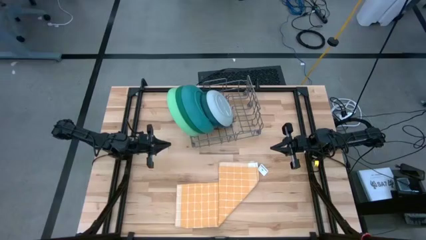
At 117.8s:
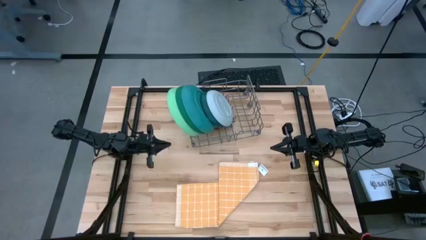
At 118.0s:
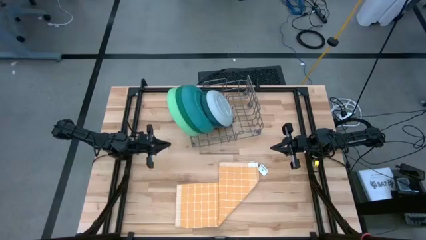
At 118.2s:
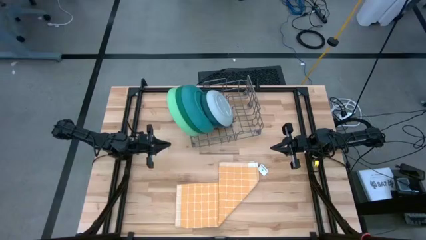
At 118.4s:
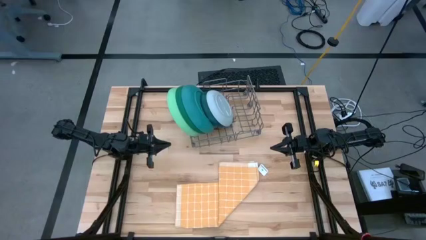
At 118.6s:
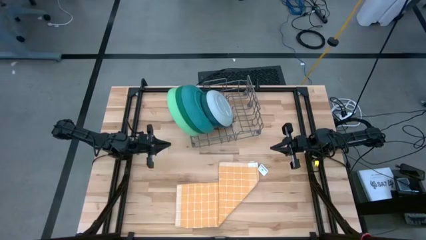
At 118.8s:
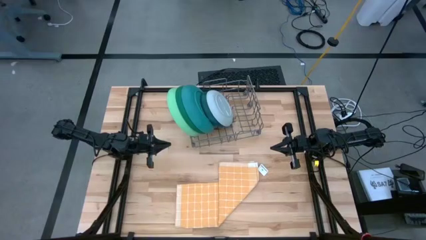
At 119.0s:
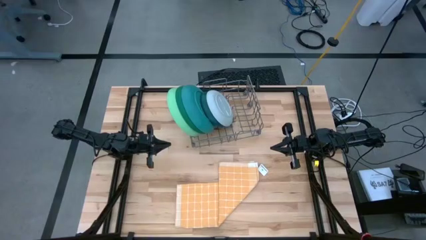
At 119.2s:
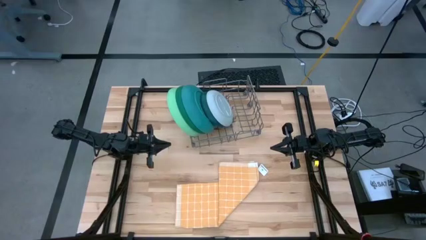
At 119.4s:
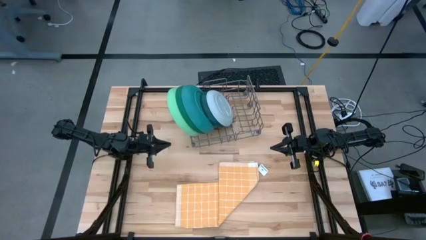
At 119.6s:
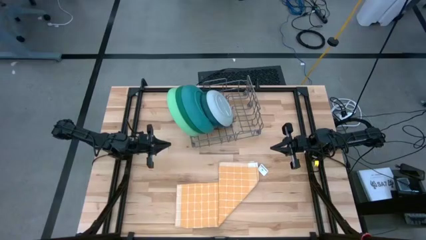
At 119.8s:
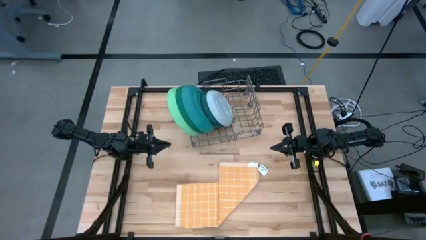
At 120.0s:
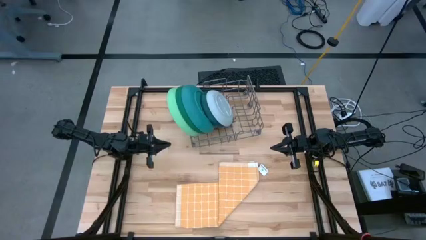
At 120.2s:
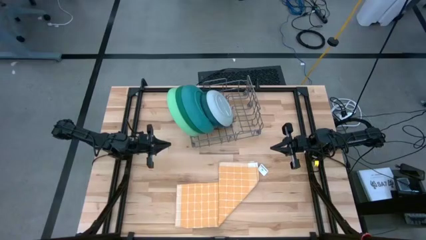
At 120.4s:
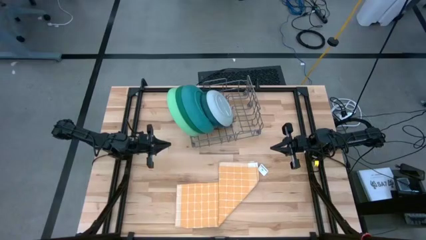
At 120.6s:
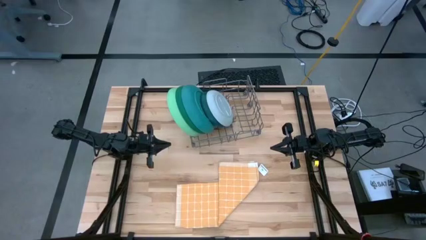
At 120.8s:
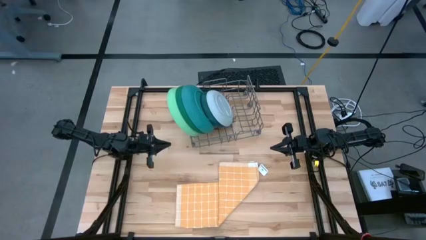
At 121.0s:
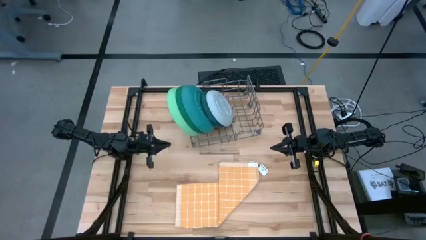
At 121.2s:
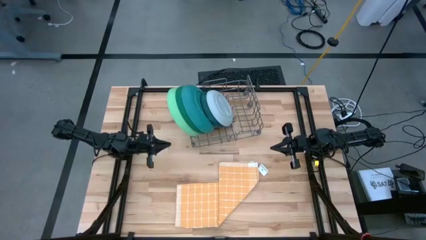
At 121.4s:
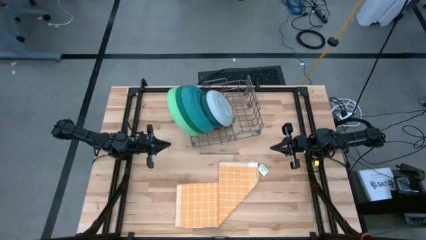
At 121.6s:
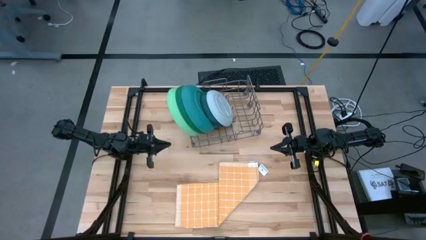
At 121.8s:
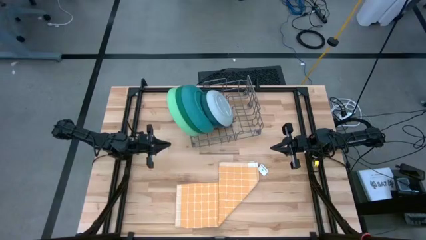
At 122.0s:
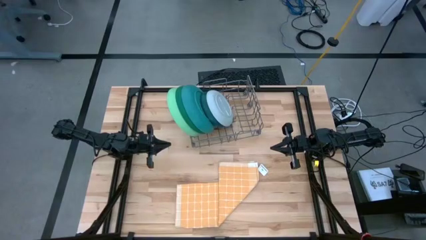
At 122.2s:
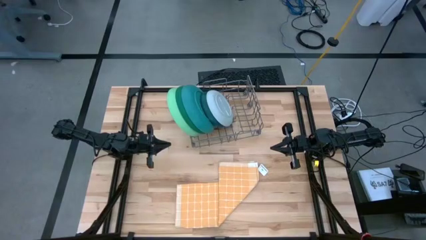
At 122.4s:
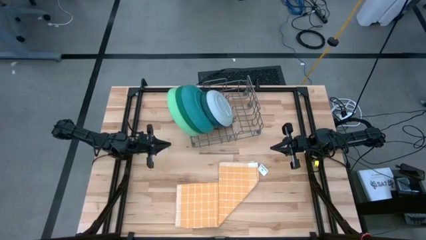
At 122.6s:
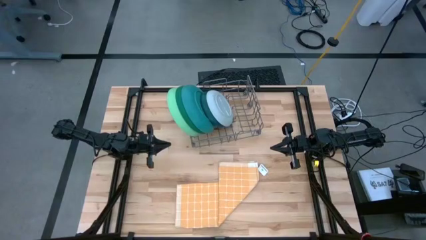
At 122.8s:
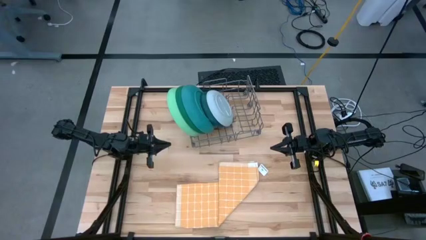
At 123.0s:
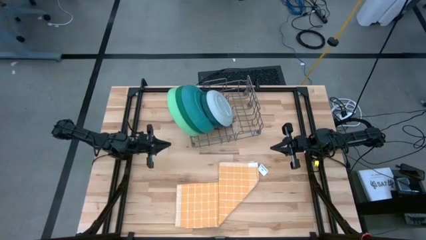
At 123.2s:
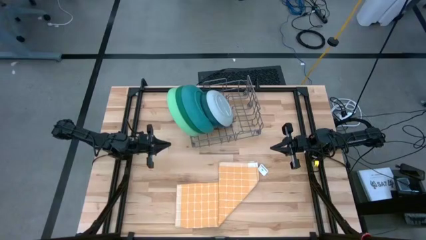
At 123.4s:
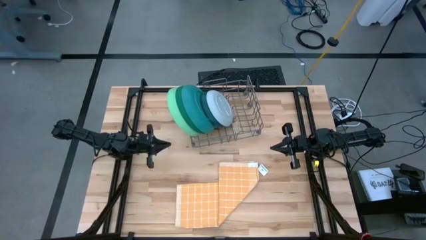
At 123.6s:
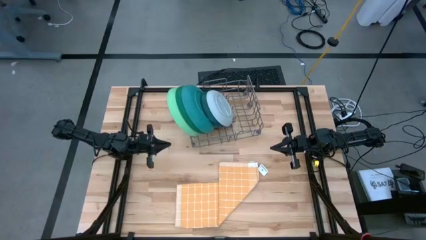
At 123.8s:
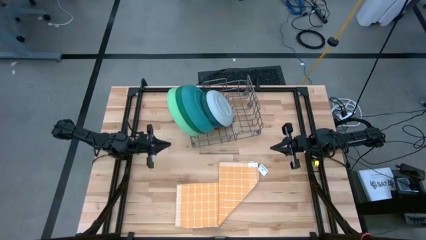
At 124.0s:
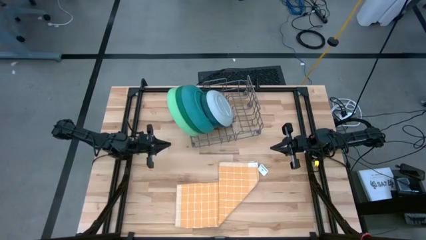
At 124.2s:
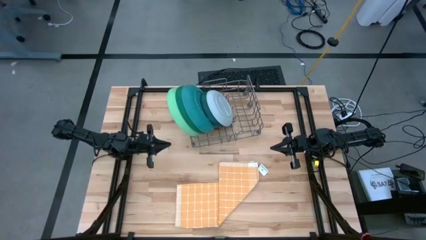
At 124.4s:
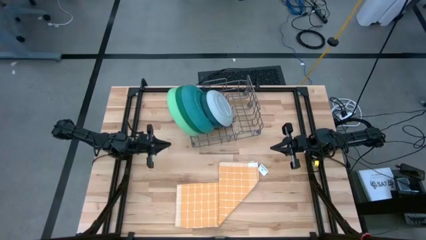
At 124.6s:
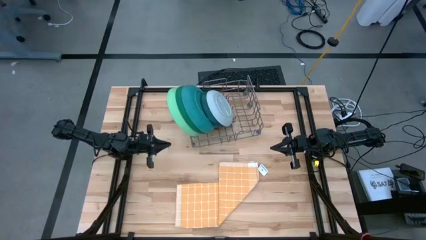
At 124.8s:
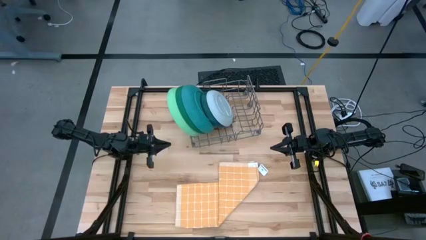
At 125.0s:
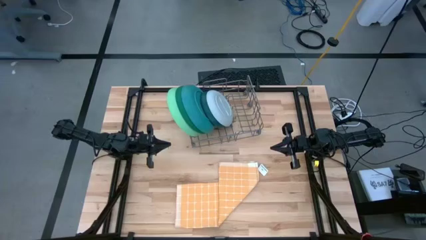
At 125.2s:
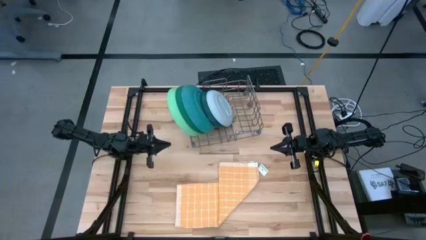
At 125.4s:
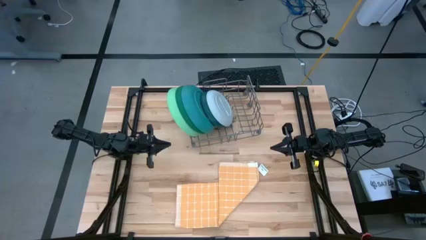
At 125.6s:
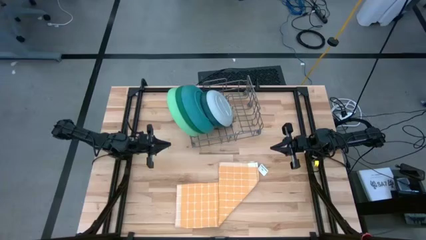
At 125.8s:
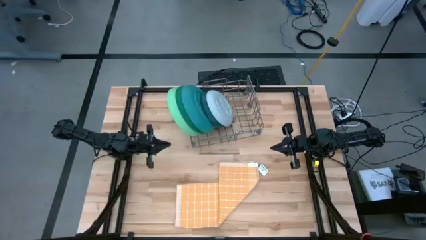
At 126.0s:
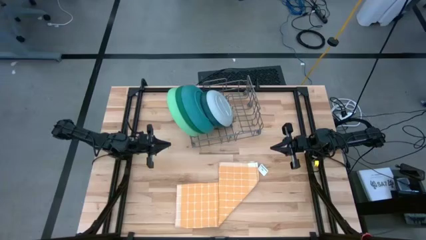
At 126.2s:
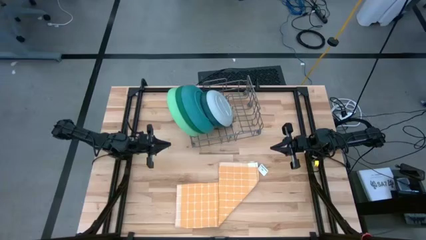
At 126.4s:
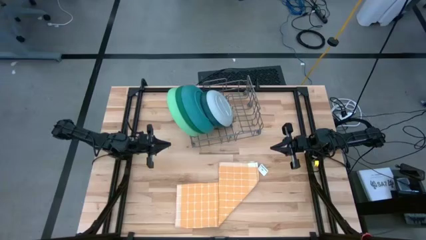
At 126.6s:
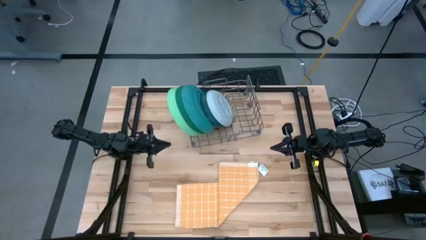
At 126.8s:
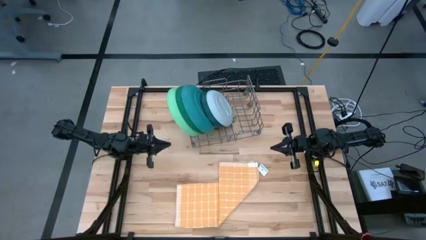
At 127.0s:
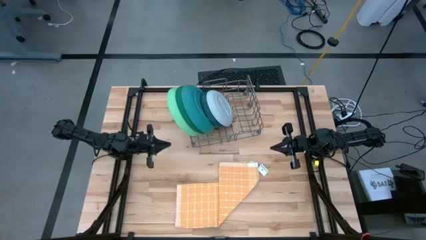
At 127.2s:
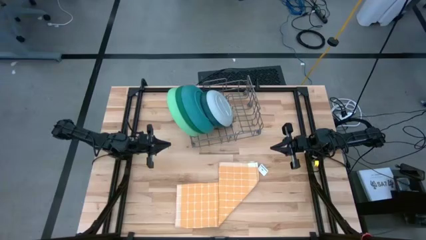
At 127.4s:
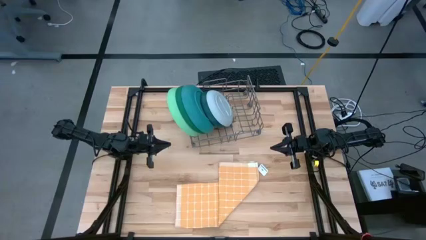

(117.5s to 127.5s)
Task: Sort dishes
Return to Home Position

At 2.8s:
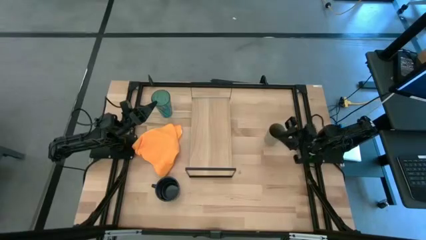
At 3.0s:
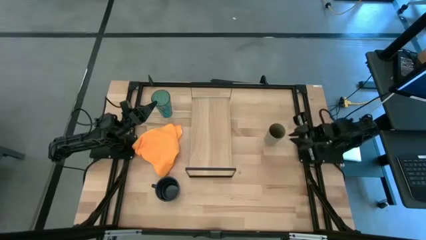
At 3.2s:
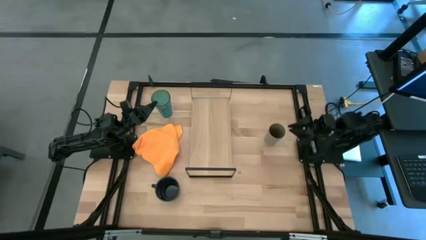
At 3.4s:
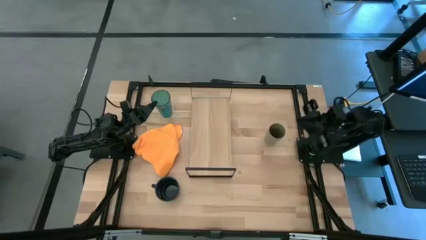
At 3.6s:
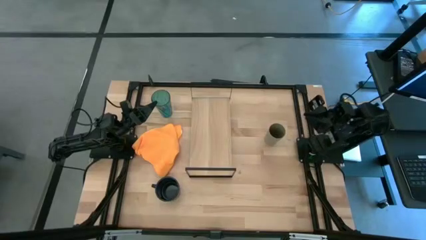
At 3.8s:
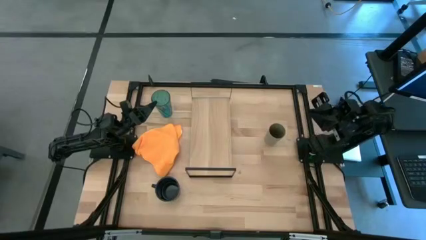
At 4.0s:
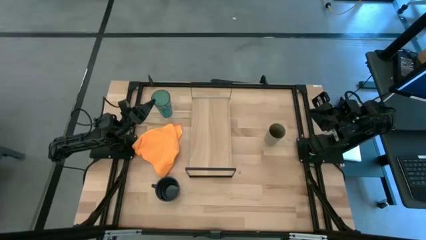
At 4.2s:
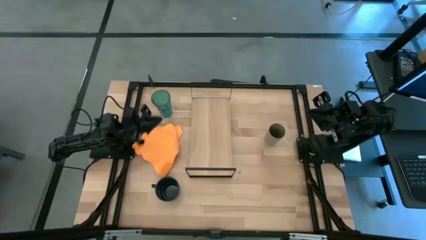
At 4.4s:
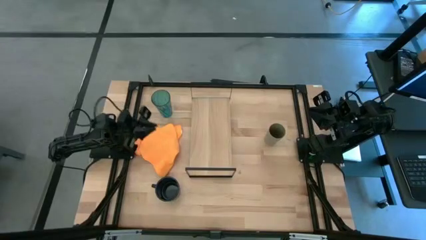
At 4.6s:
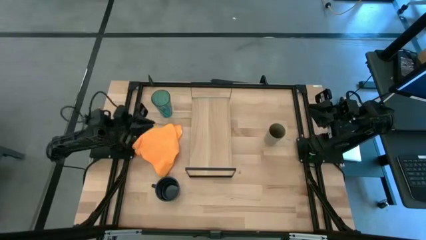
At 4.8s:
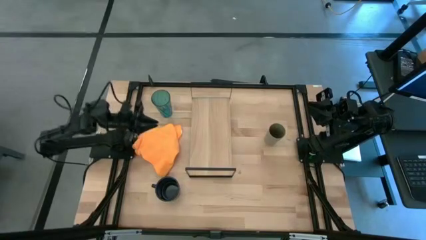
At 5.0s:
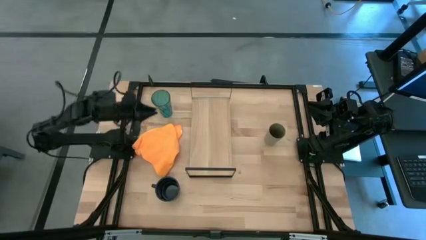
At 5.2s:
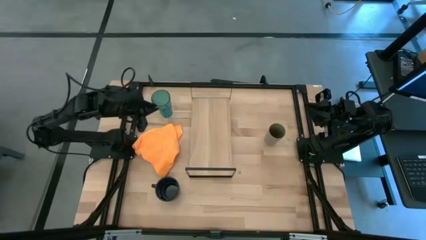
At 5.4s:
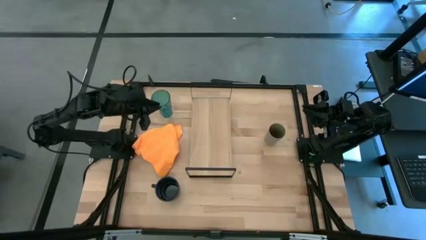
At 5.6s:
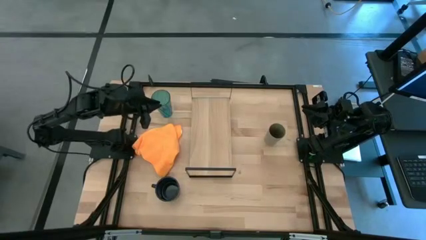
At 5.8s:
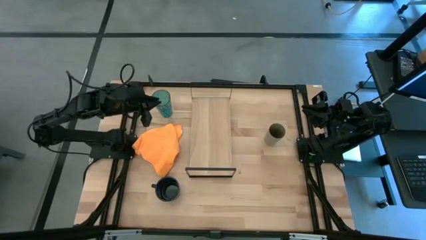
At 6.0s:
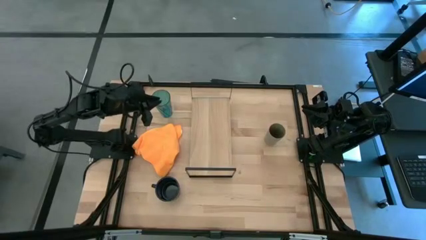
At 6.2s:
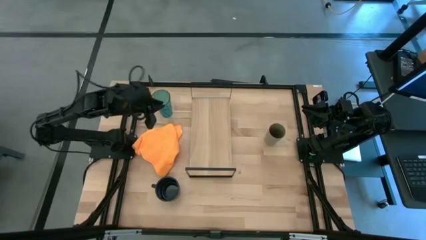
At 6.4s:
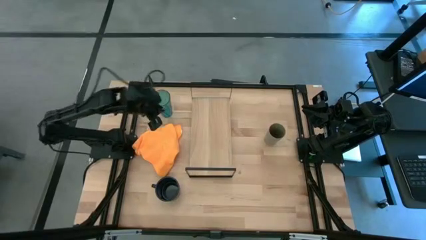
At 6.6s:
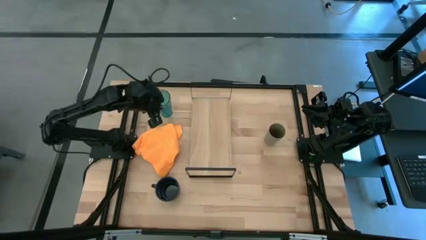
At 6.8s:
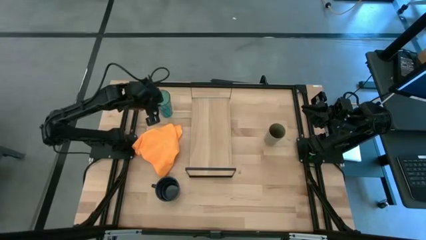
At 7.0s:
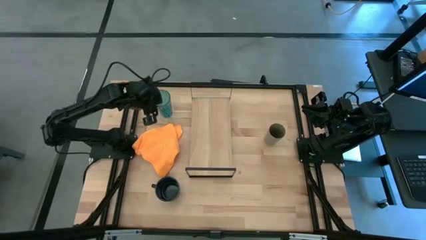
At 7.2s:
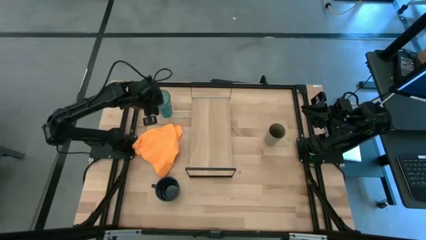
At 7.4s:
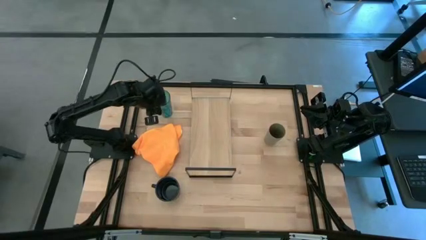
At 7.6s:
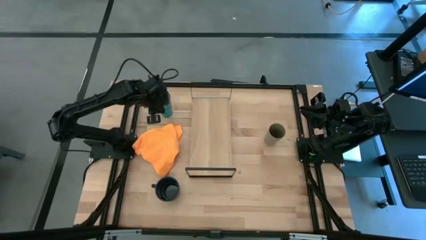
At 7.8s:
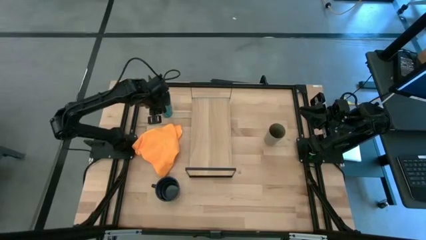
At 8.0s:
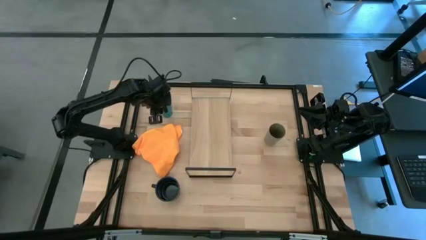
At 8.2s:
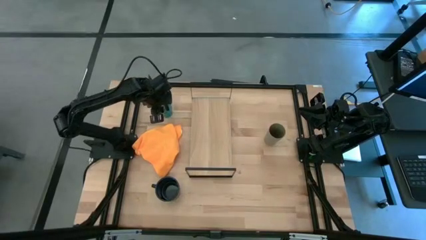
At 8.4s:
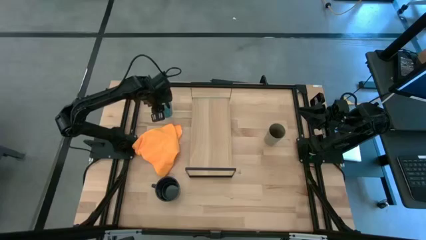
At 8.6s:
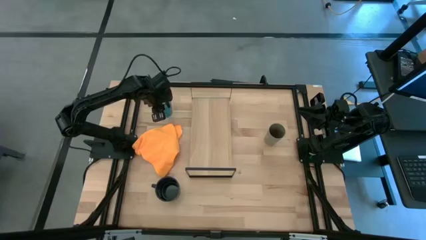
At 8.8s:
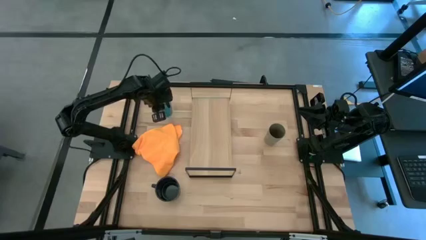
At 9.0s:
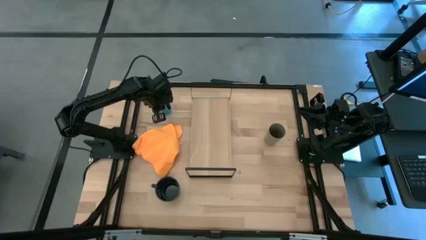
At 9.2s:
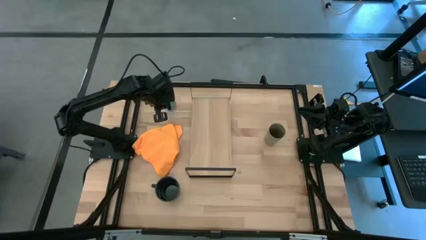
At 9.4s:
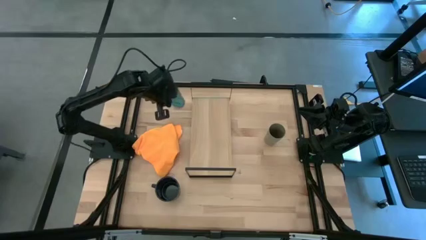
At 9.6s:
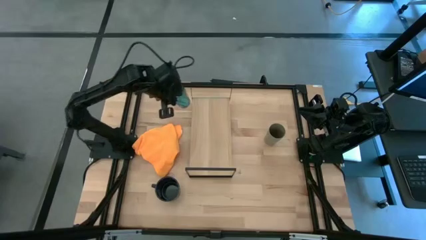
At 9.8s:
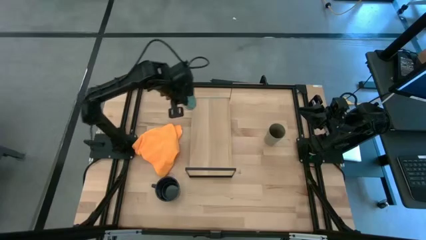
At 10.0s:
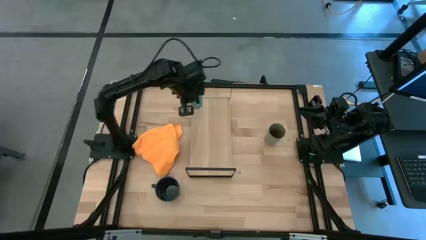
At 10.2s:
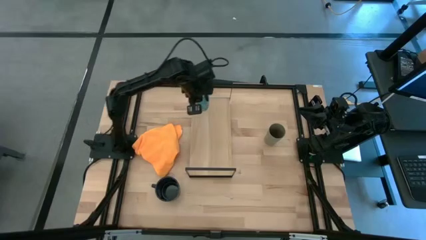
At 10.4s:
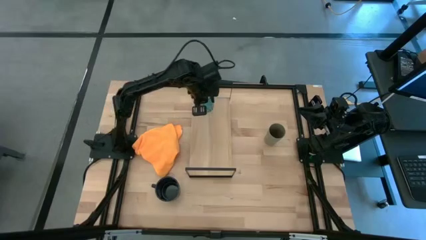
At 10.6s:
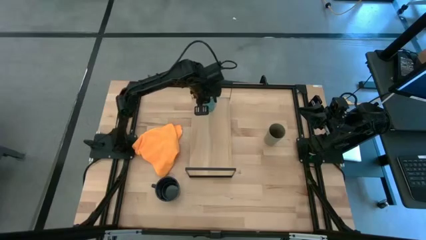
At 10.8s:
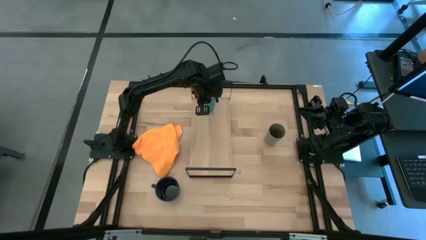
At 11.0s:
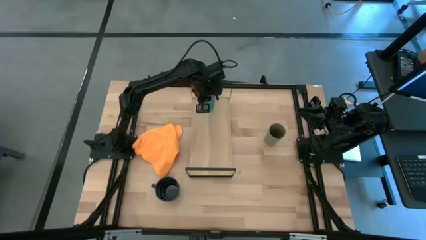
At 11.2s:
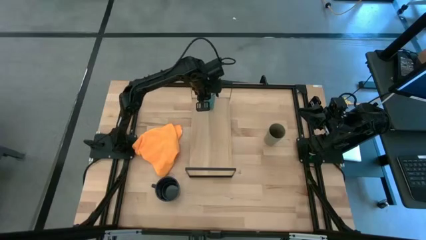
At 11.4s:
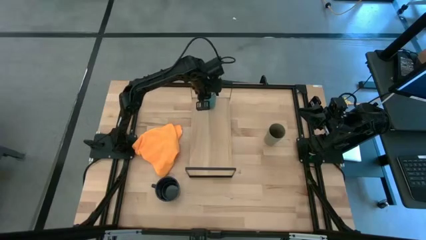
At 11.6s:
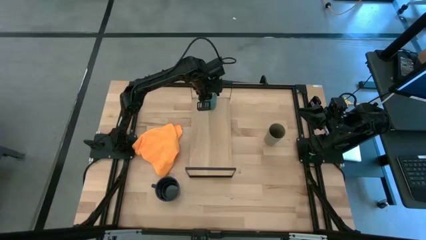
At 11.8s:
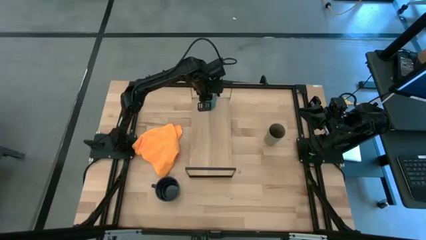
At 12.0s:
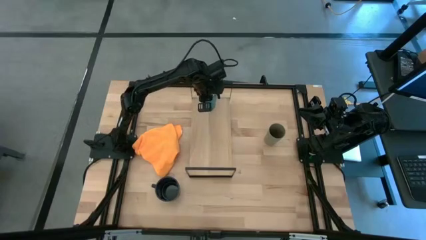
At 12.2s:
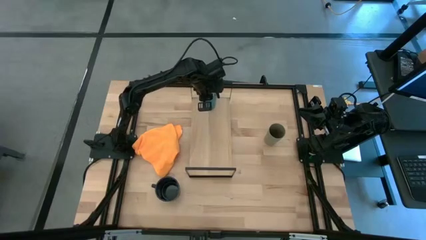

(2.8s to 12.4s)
Task: Stack small to large cups/mugs on shelf
Put the blue glass on the shelf
